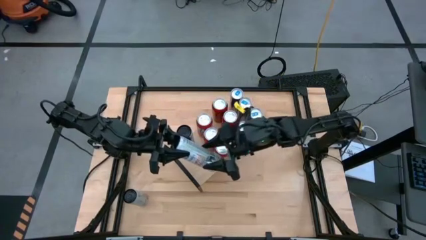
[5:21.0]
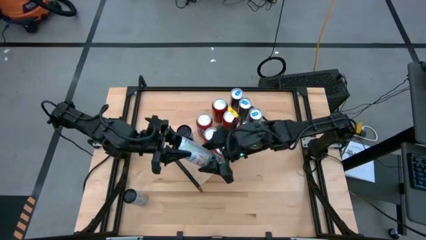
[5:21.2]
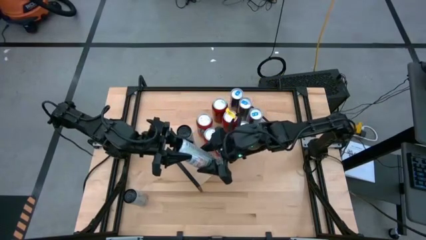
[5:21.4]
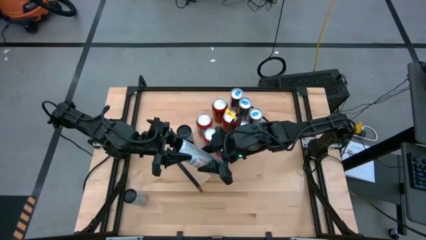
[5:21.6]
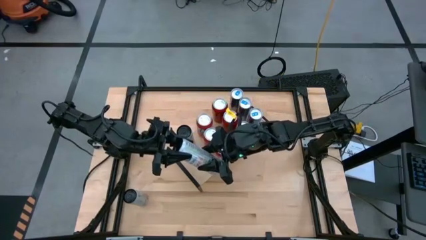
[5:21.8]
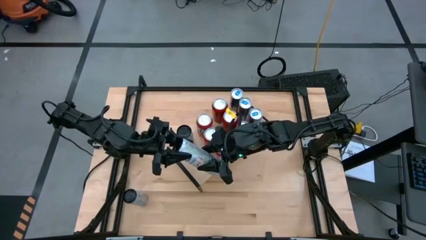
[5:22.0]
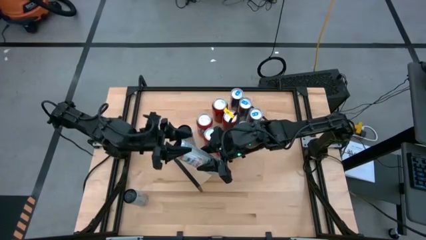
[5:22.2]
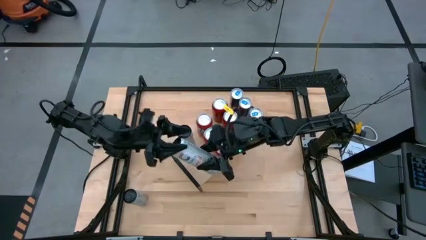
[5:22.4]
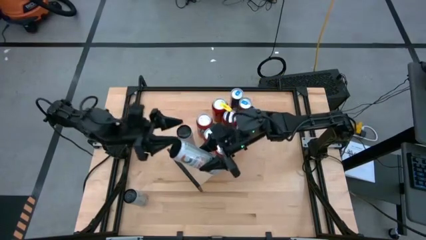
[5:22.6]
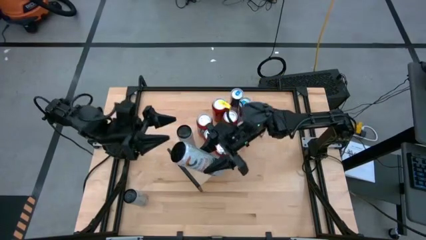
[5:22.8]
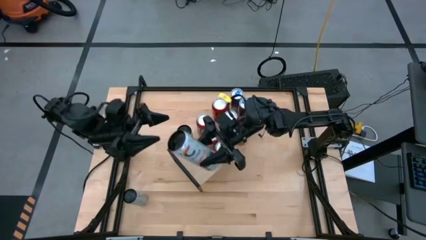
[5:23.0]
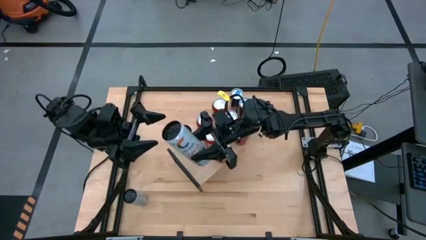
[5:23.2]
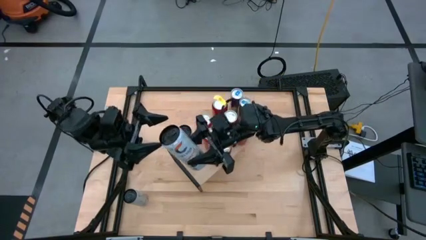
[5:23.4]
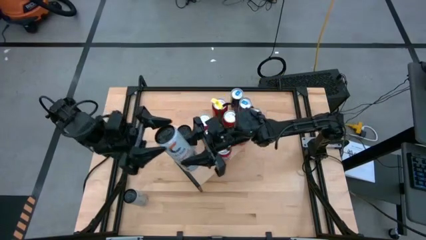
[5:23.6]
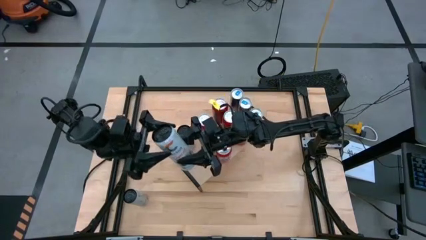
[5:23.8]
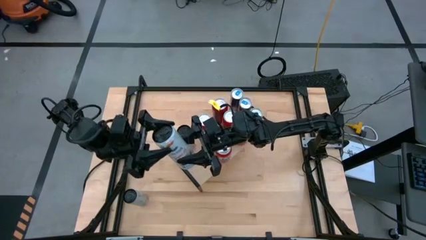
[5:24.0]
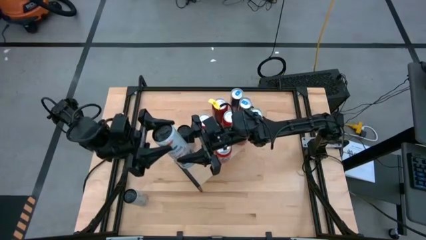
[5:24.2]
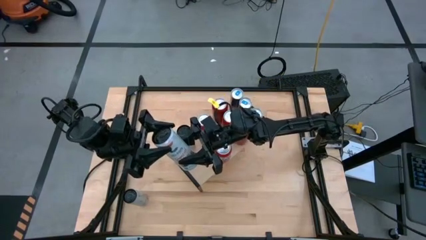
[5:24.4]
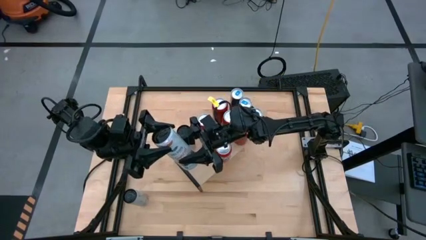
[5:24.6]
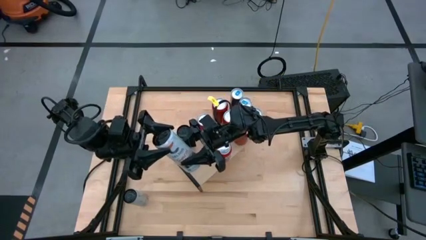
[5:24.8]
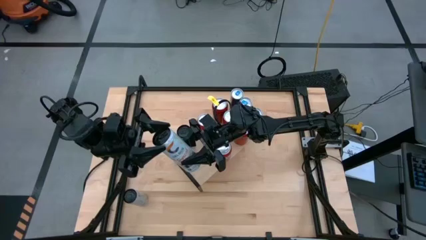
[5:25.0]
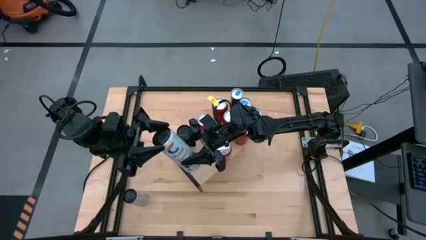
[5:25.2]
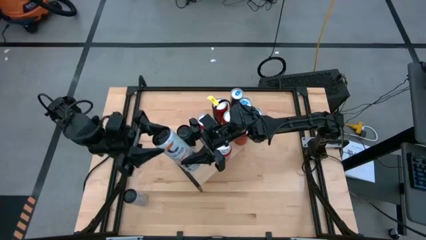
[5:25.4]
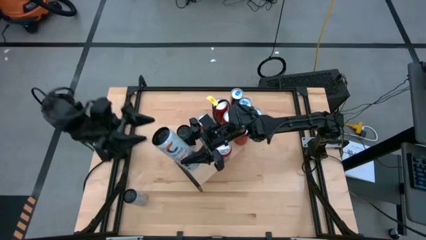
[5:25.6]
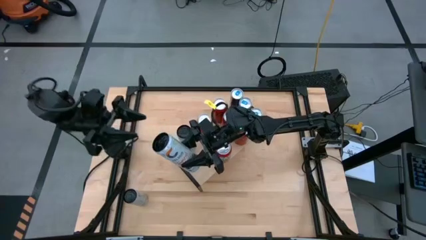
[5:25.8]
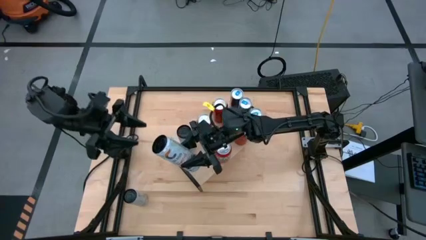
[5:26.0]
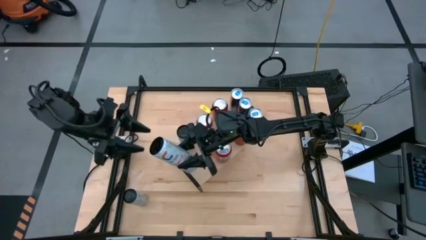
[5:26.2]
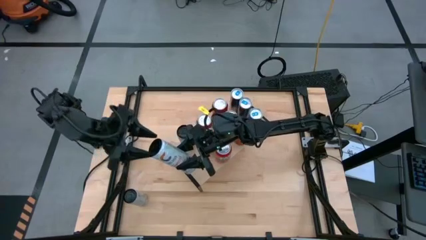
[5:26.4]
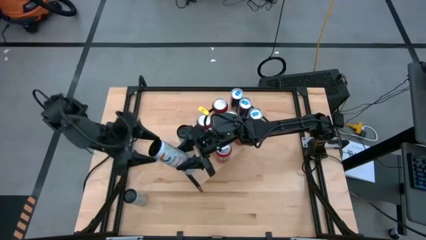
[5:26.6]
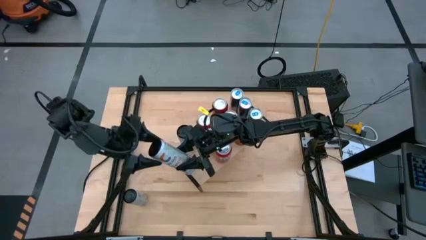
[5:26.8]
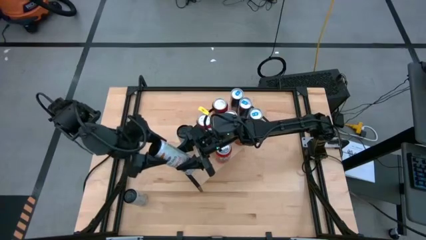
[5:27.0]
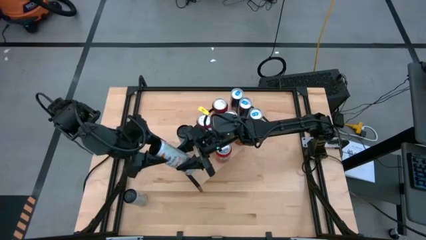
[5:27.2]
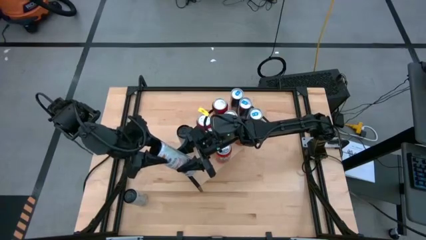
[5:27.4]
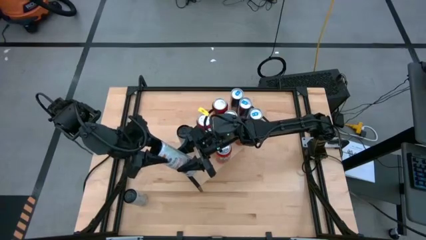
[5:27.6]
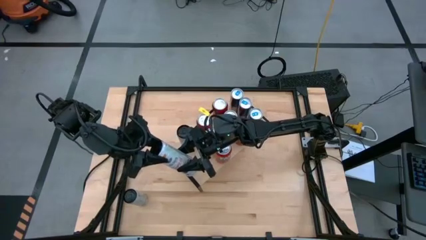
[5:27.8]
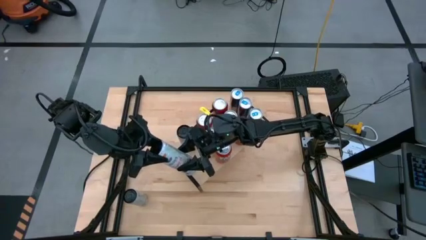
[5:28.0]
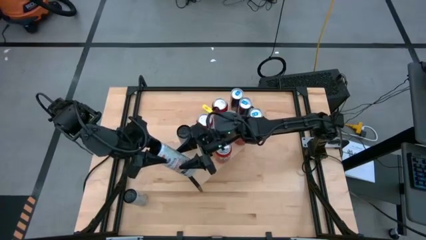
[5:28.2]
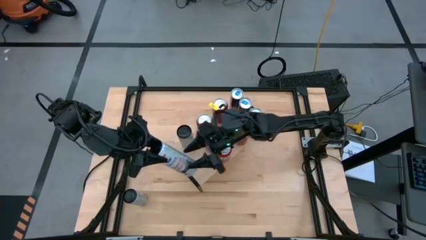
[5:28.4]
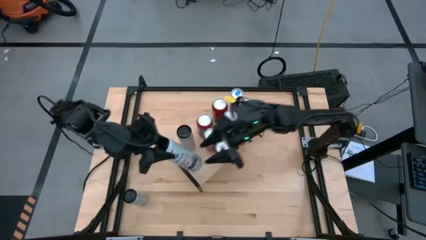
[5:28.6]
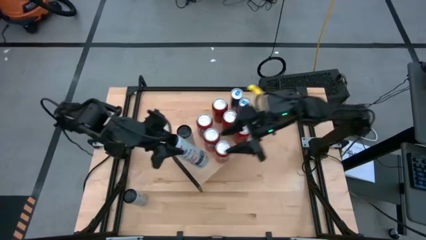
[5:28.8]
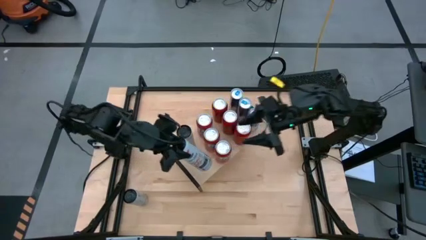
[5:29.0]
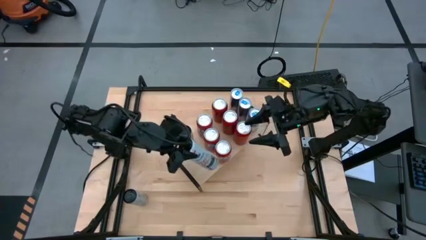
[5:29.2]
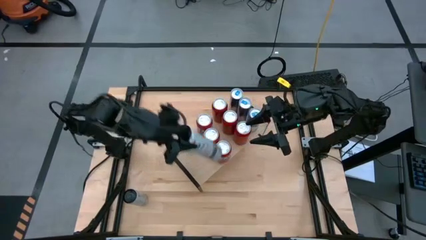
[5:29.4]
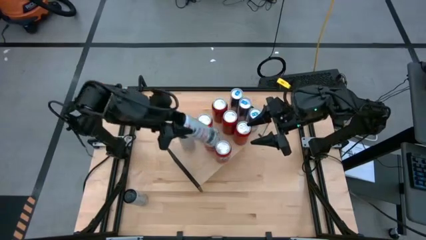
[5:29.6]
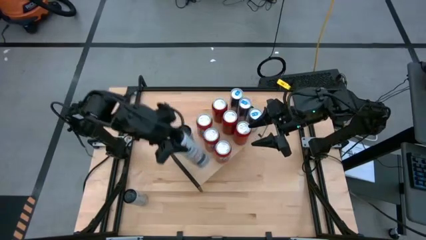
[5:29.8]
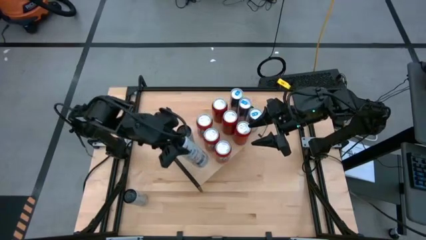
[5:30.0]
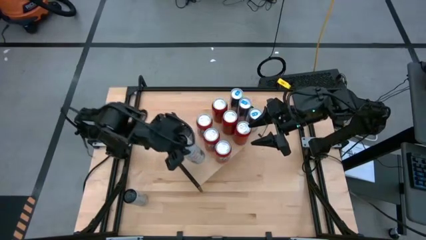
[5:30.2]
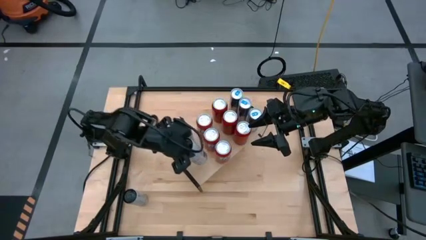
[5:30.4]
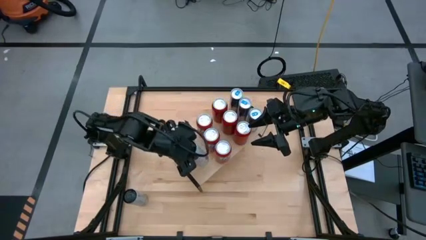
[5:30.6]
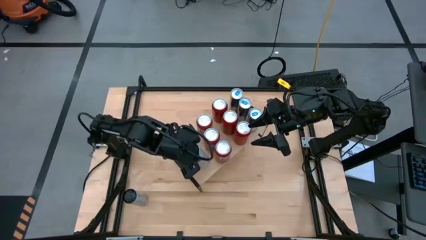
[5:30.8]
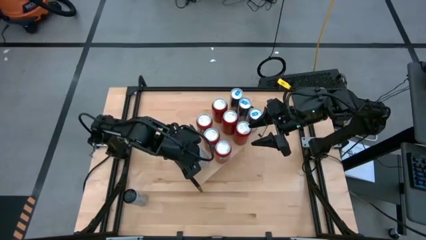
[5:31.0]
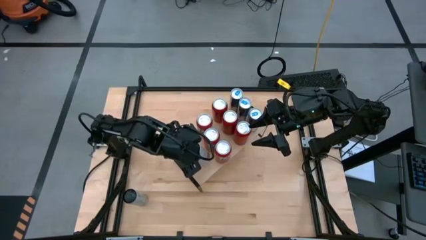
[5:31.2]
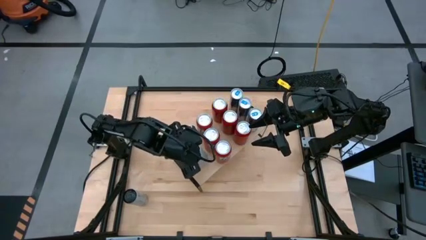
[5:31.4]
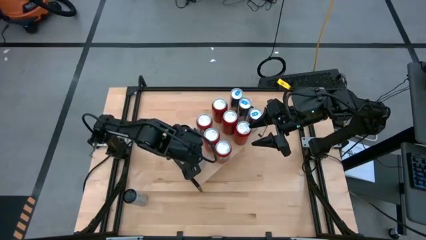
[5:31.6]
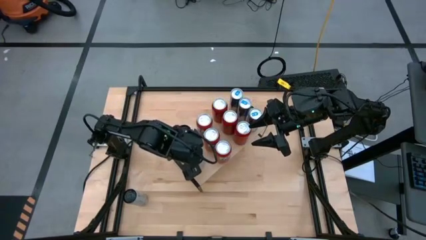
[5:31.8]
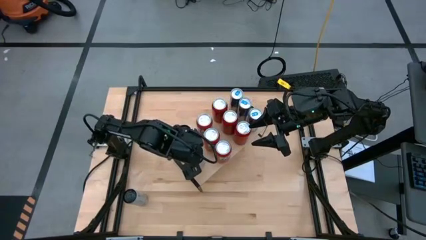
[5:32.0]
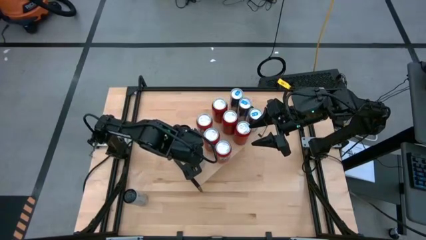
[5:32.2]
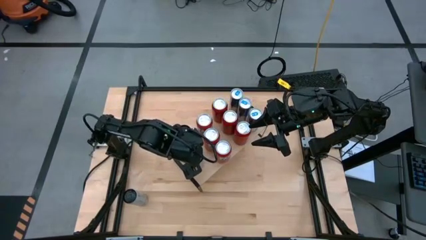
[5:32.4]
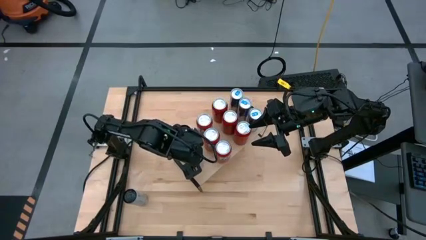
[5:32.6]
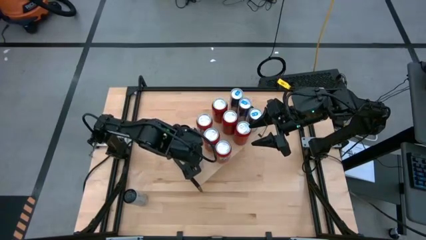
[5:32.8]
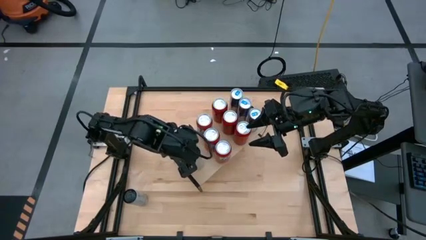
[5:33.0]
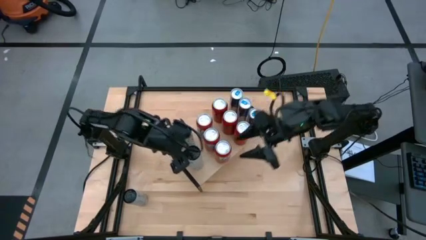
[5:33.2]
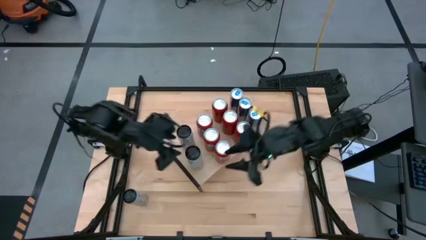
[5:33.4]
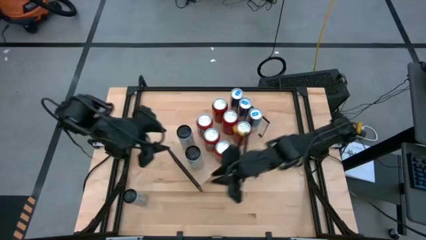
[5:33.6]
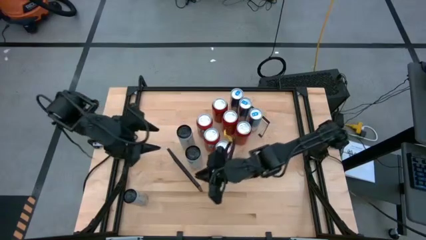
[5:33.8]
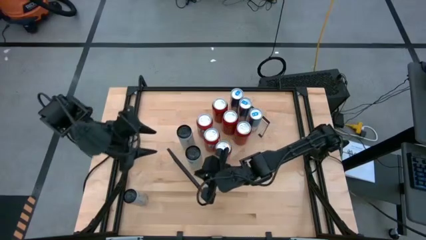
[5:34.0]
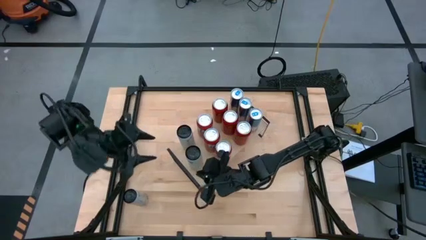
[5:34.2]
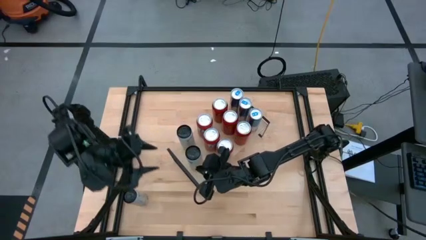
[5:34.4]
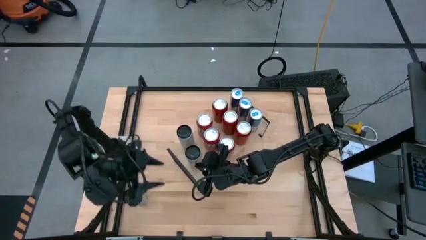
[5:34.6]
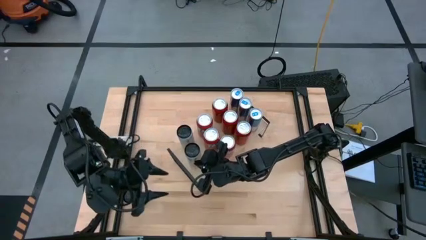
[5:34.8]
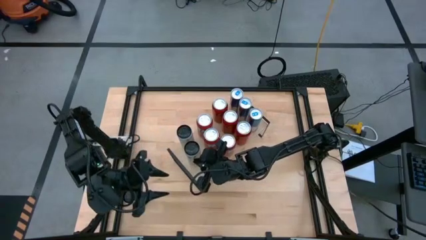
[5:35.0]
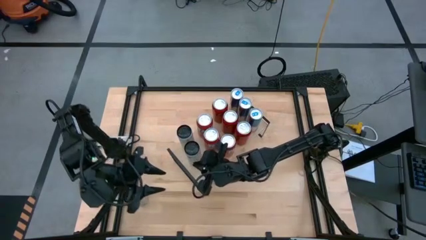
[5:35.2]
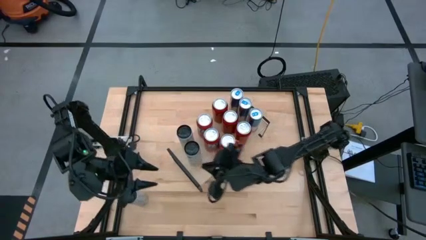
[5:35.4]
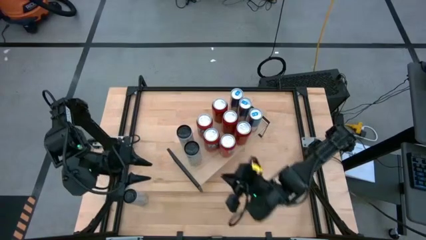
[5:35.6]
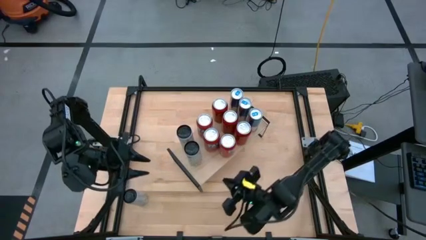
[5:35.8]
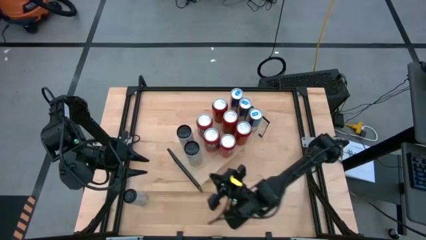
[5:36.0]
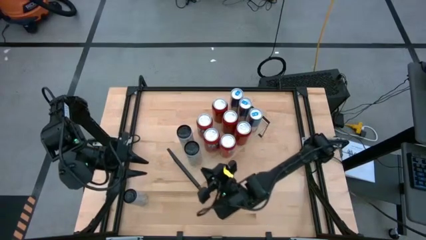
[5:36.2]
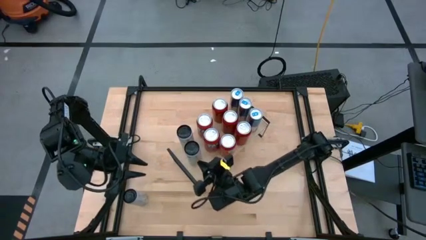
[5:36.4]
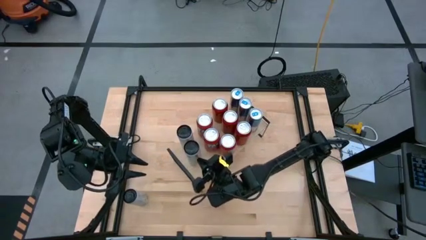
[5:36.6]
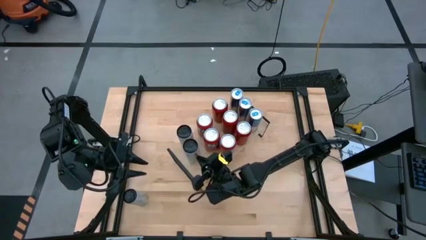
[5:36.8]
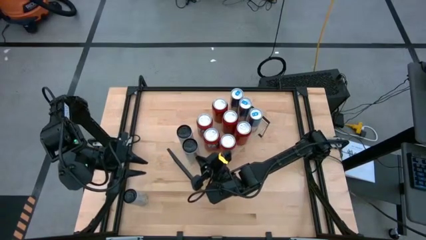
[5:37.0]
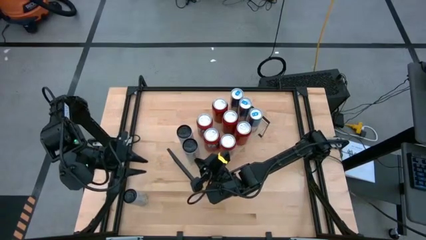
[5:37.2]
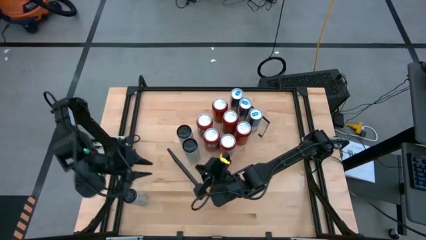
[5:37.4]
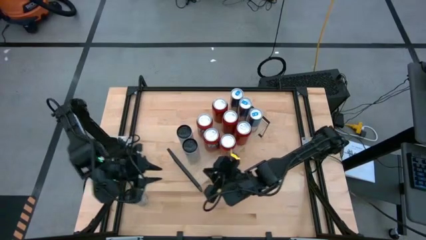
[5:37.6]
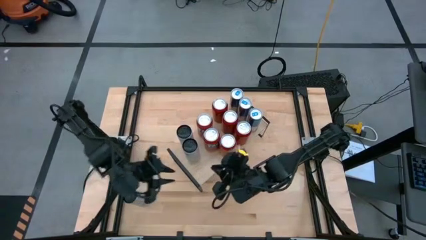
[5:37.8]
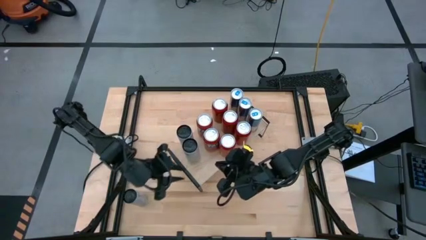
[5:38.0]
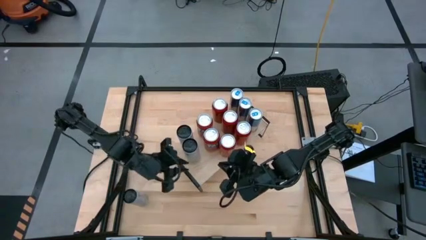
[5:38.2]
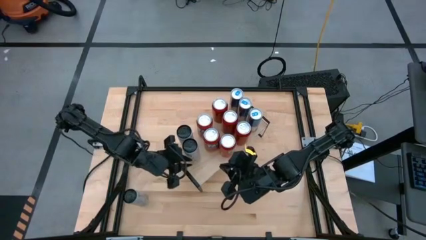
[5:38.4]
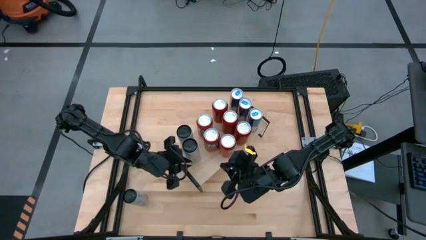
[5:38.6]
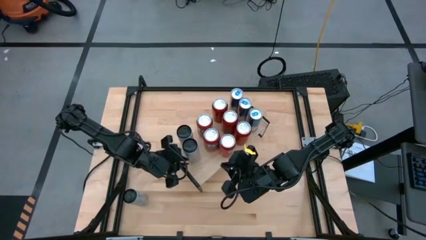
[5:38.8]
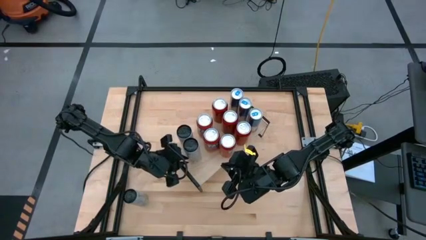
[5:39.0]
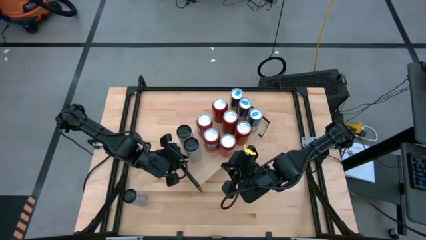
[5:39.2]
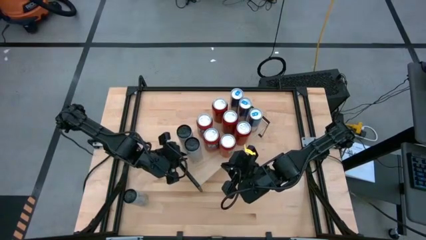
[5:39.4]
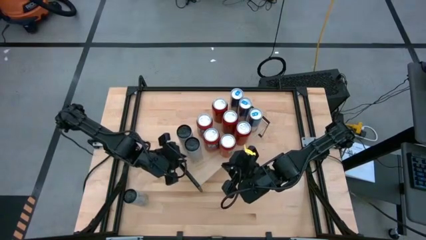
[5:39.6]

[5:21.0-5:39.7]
Task: Place canned beverage on shelf
Put the right white soda can on the shelf
